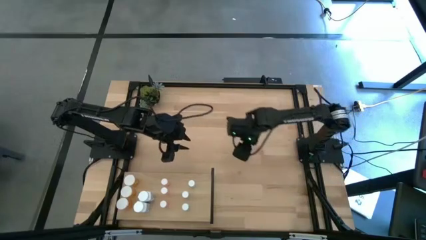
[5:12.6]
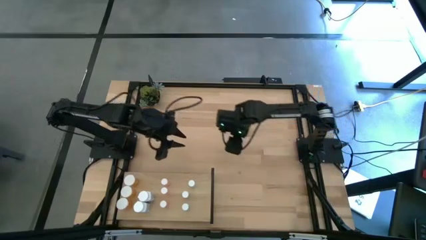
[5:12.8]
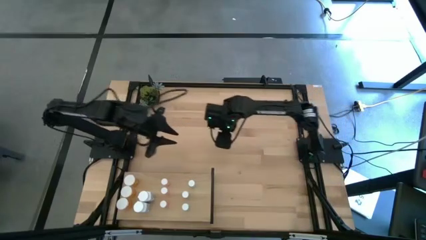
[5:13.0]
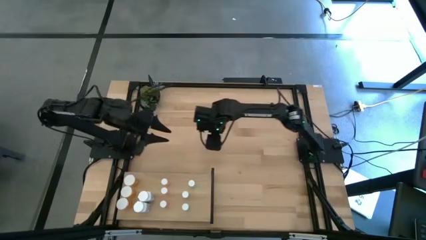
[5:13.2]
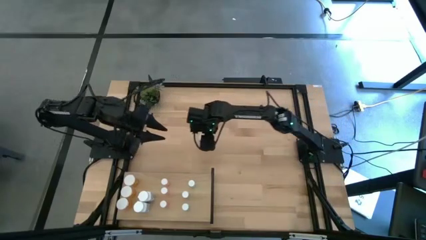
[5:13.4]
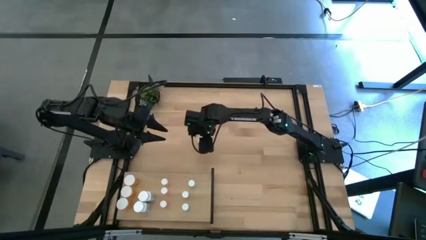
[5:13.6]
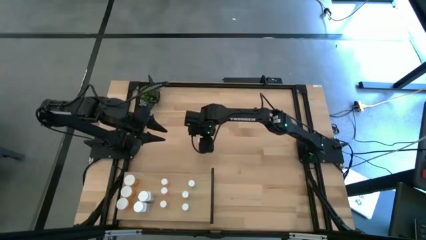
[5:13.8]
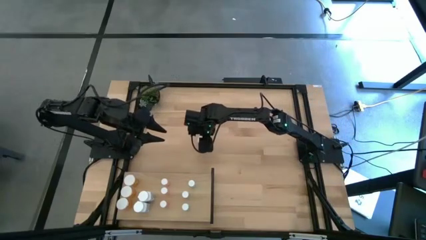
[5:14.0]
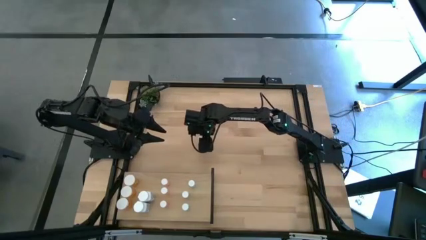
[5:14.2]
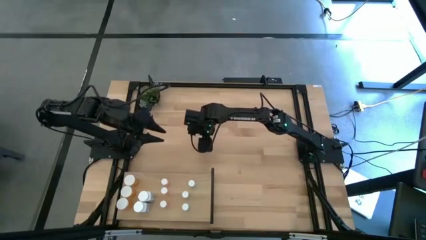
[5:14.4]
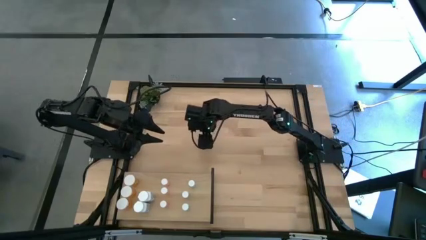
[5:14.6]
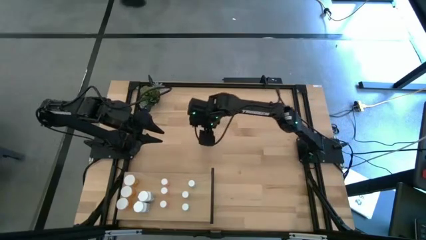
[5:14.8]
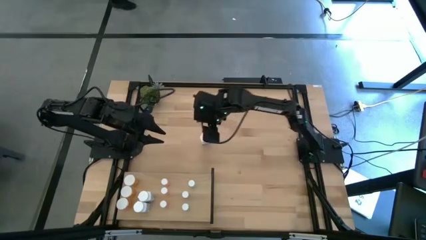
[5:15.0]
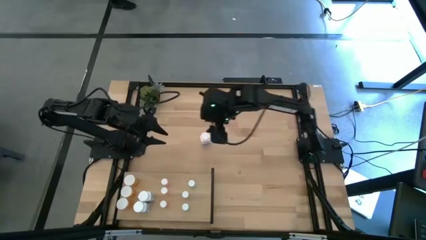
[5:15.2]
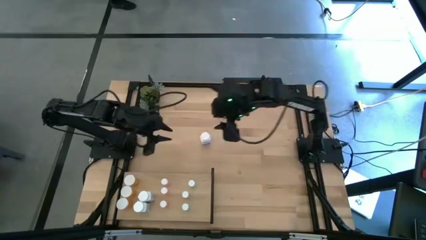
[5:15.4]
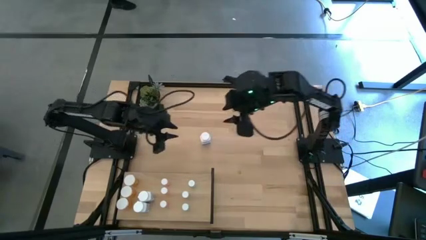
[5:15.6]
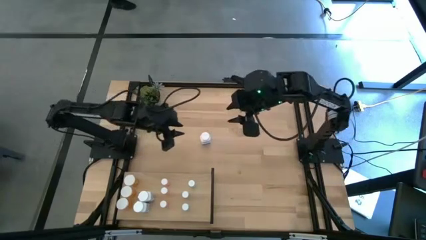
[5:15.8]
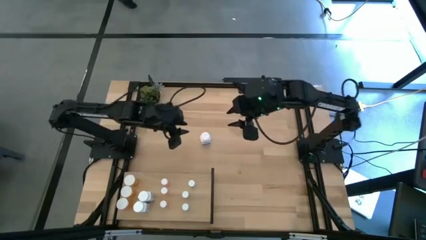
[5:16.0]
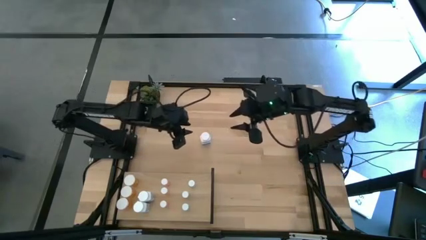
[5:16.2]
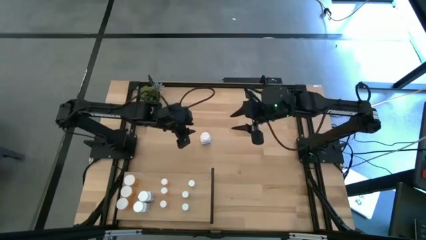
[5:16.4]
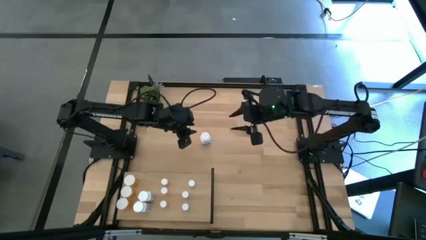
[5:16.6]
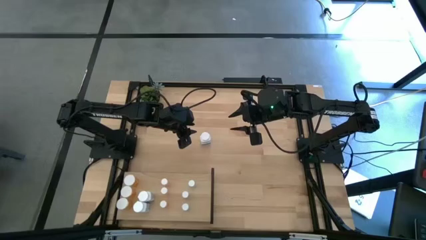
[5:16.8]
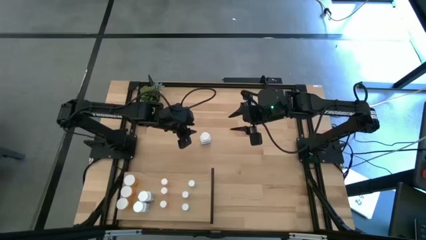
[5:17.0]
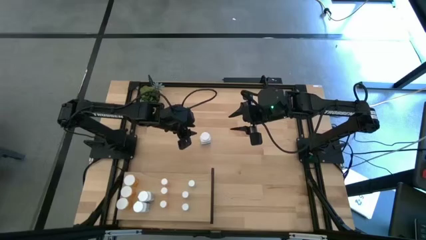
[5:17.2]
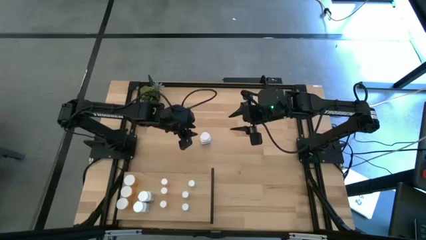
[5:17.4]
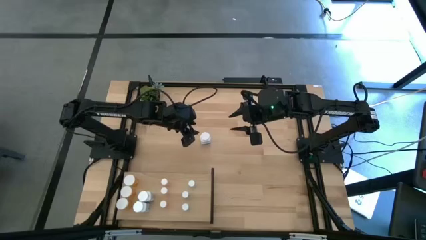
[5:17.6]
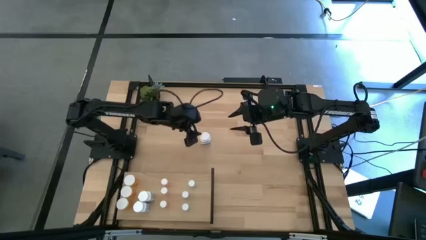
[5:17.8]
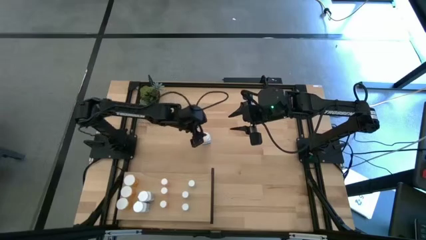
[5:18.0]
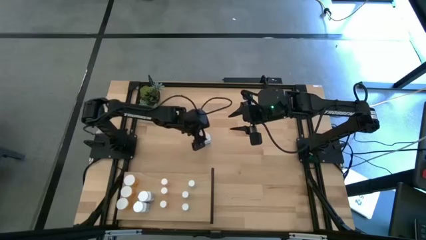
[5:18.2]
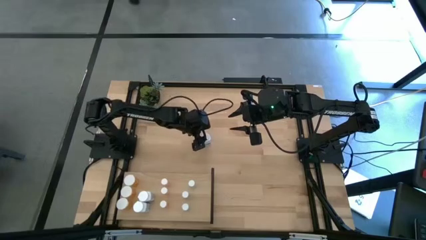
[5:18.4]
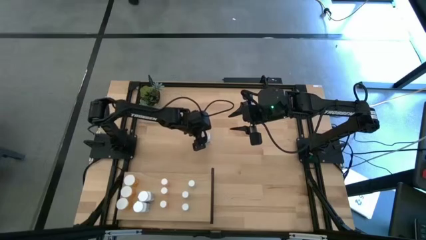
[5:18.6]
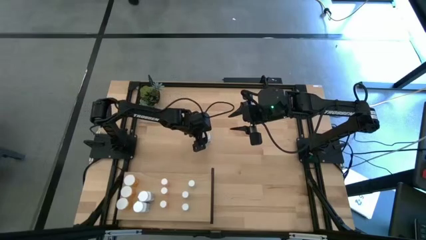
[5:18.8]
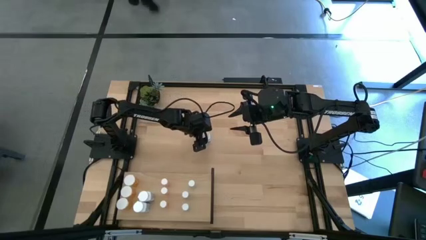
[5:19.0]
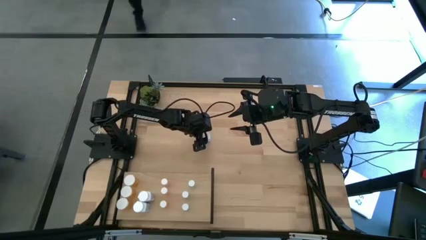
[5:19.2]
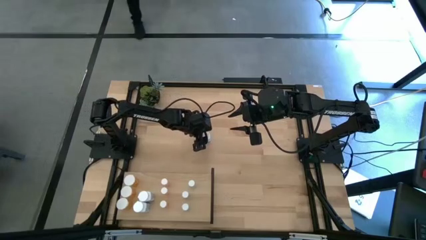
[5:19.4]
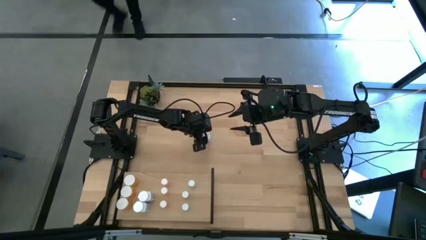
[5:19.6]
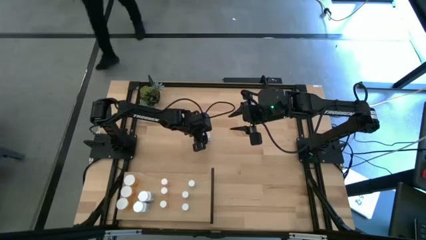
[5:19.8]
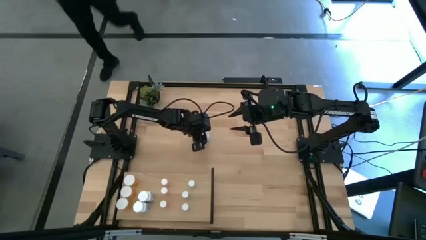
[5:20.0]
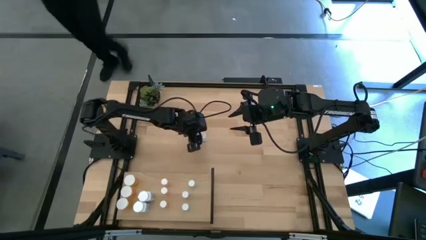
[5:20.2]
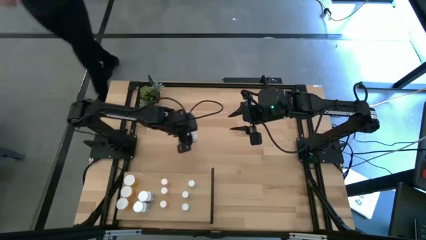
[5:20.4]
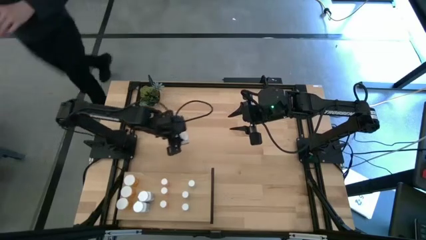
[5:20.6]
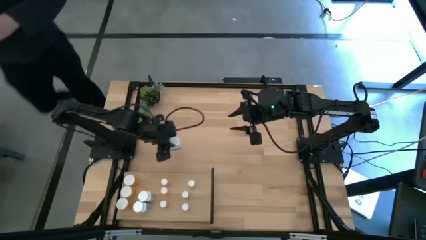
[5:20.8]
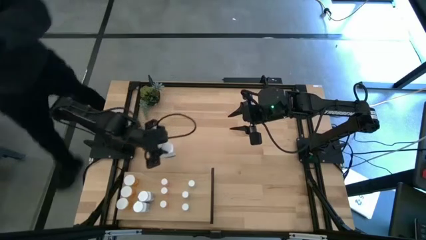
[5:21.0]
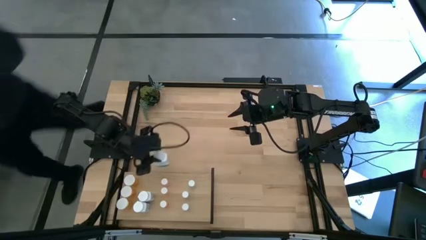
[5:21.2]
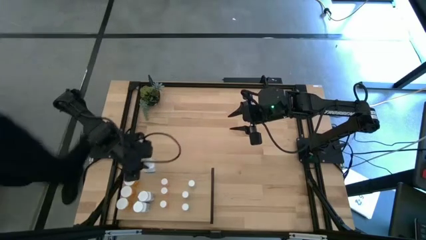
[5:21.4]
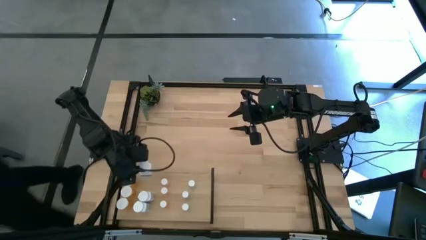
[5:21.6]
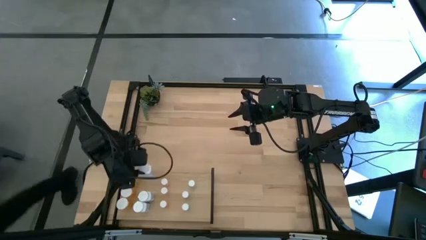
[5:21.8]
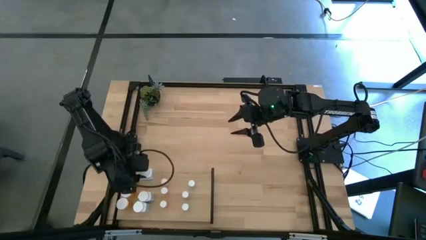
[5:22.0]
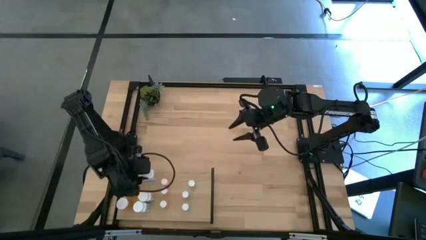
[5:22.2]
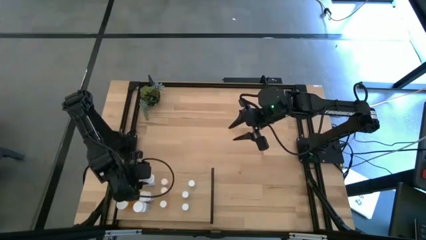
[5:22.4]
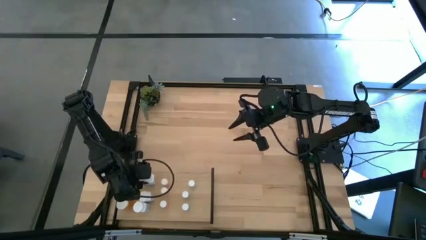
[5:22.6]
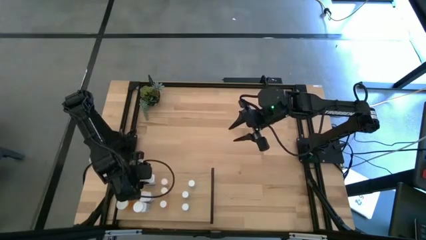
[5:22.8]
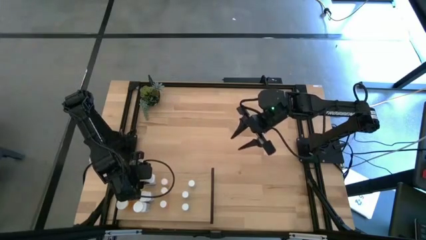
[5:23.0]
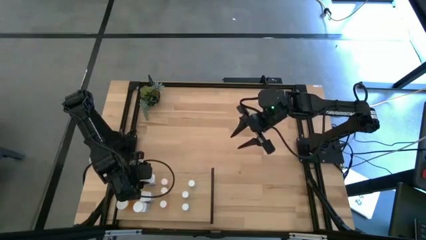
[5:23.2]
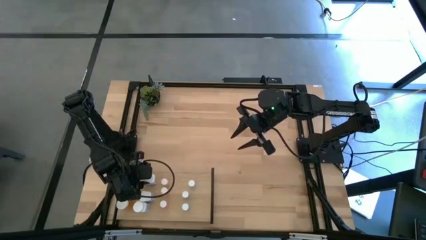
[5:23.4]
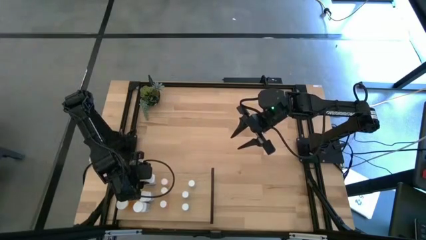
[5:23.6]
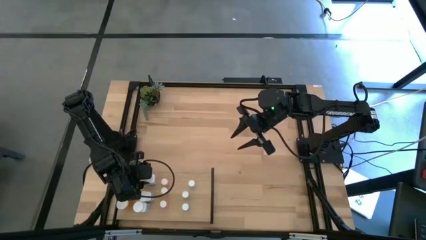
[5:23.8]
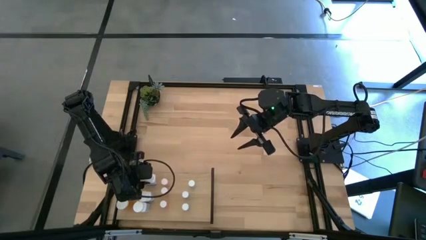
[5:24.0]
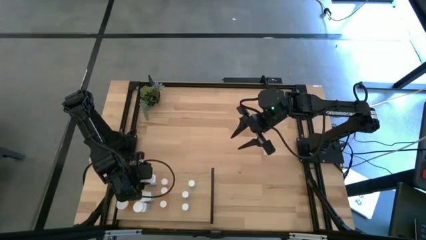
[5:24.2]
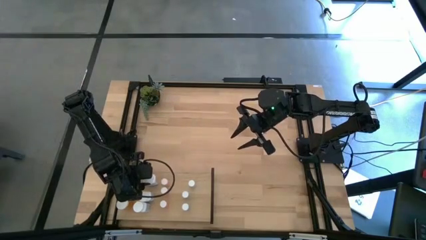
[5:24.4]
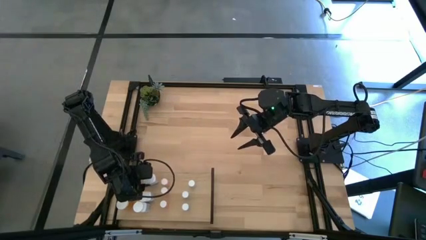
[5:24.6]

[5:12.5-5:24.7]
Task: Pick and place medicine bottles onto shelf by color
Put the big white pill bottle on the shelf aligned with the other big white pill bottles
